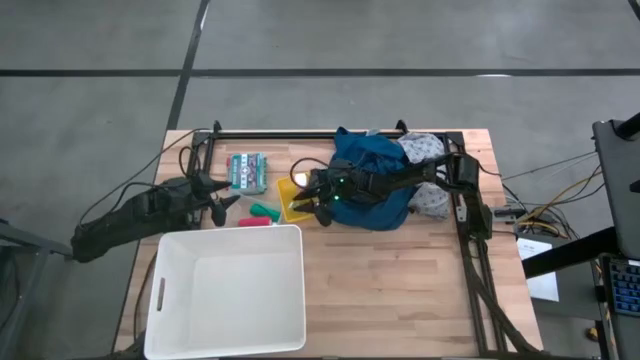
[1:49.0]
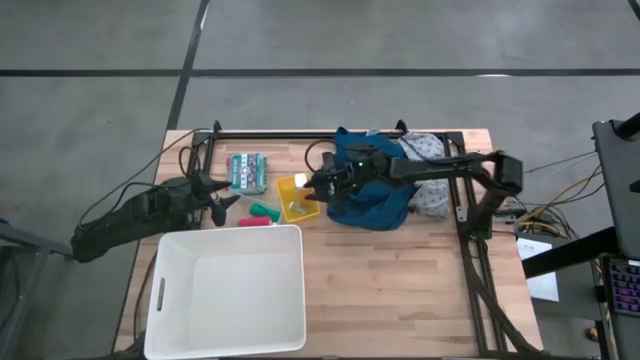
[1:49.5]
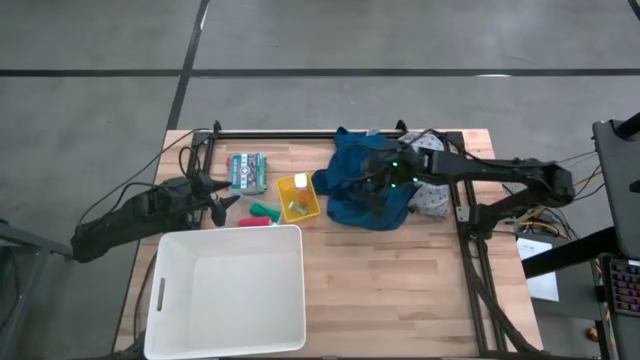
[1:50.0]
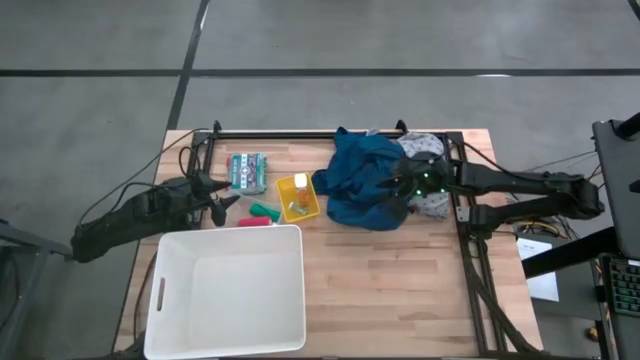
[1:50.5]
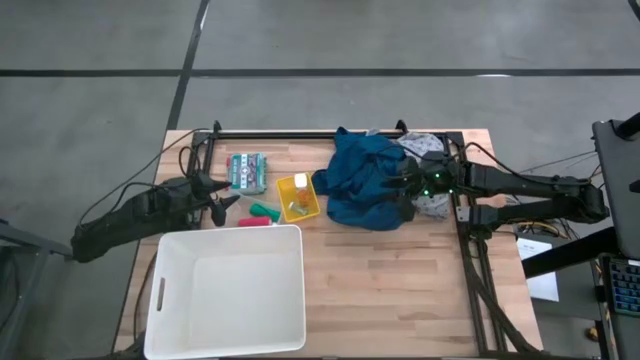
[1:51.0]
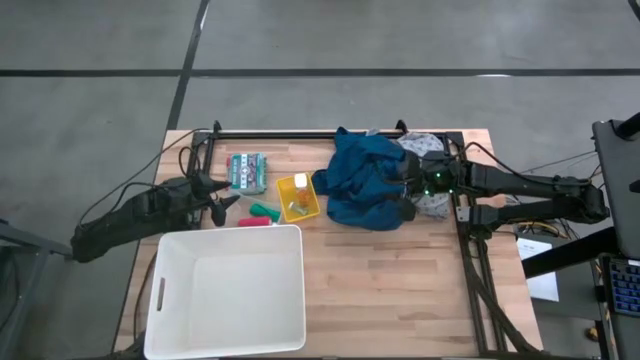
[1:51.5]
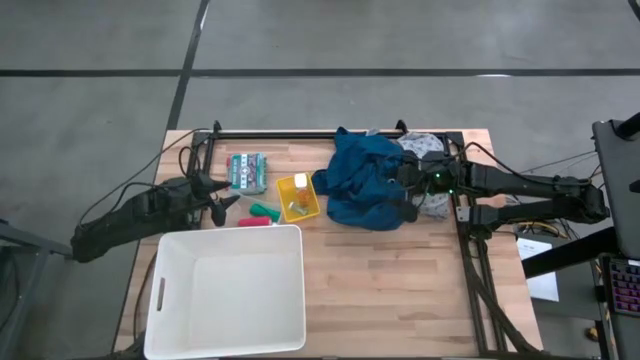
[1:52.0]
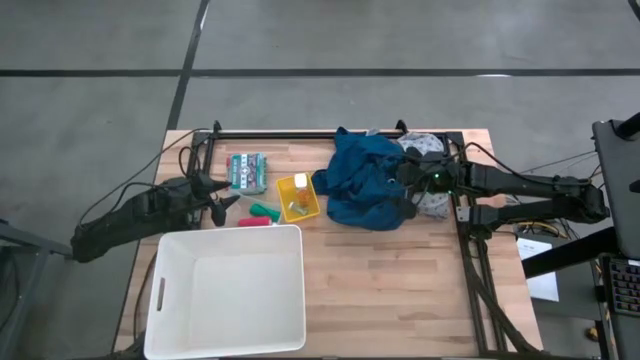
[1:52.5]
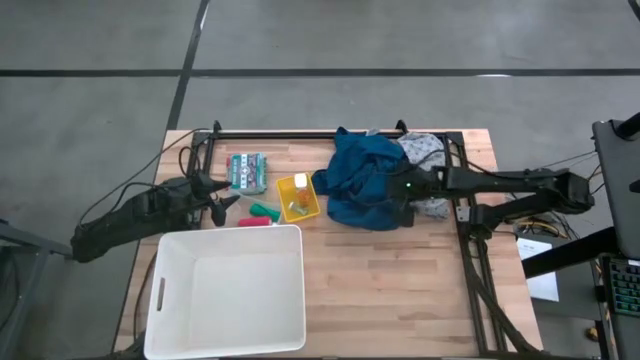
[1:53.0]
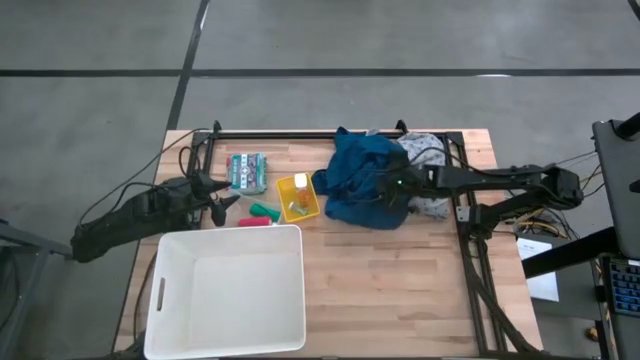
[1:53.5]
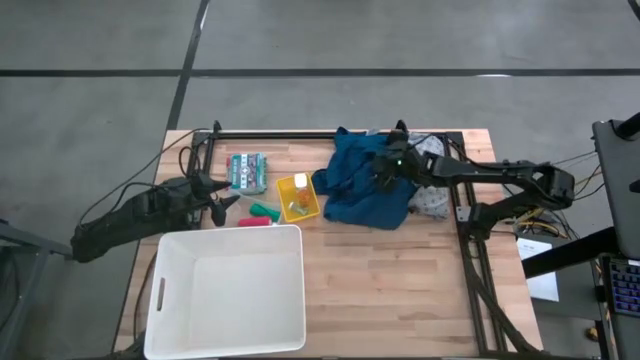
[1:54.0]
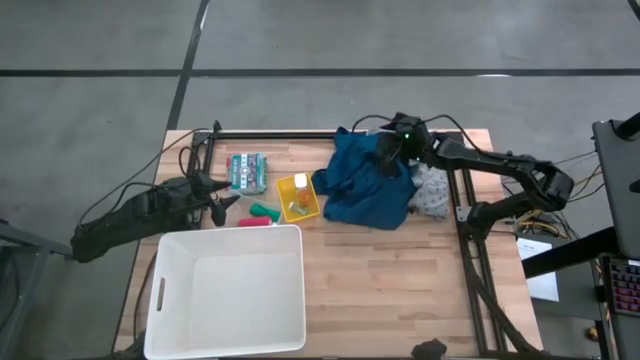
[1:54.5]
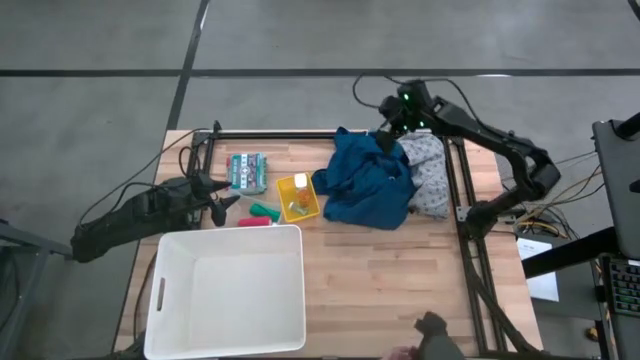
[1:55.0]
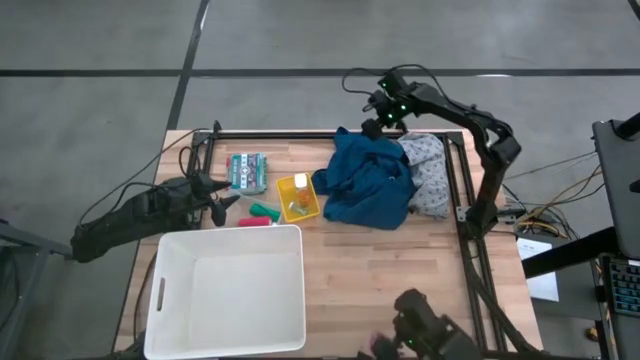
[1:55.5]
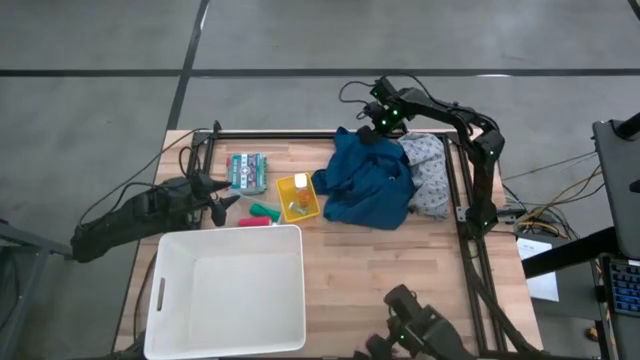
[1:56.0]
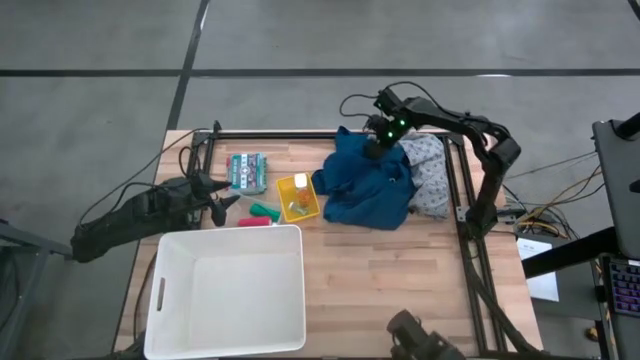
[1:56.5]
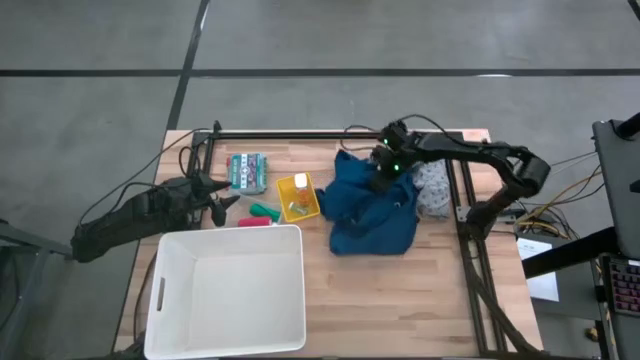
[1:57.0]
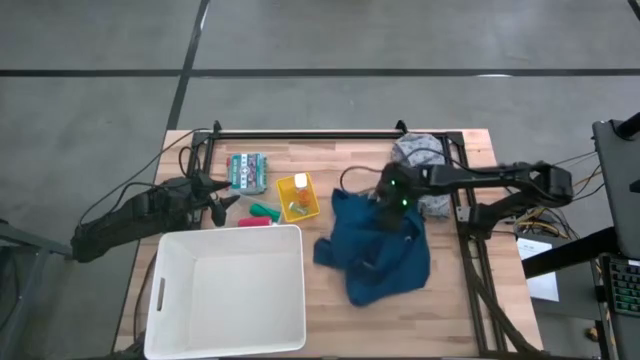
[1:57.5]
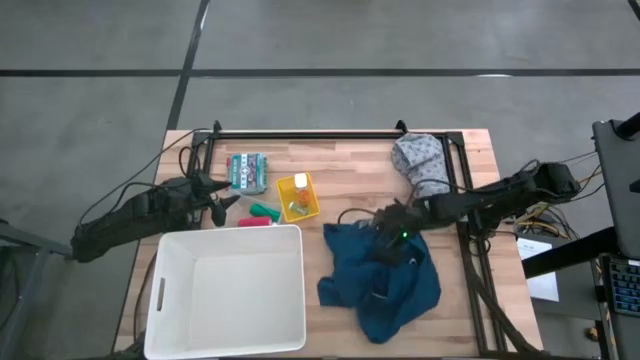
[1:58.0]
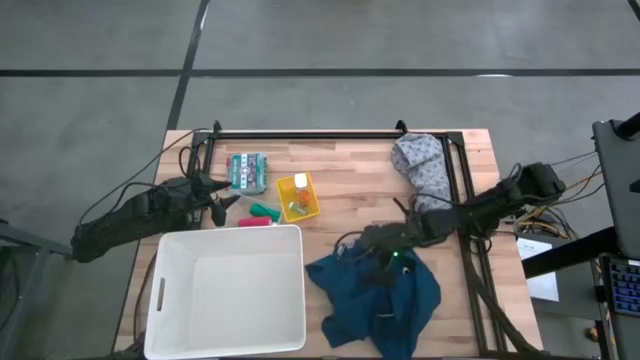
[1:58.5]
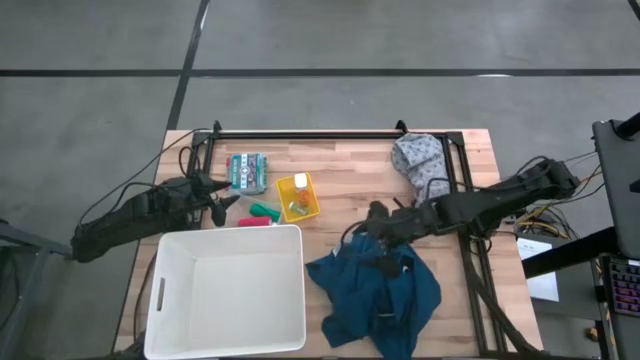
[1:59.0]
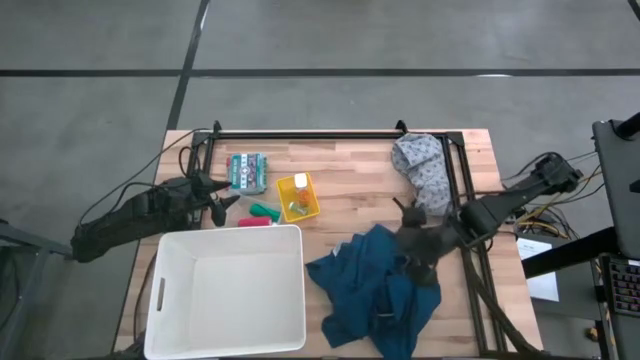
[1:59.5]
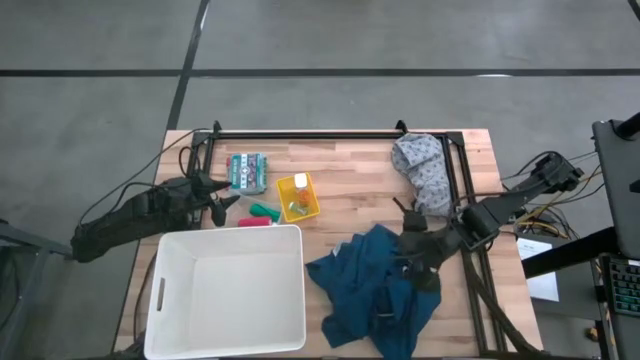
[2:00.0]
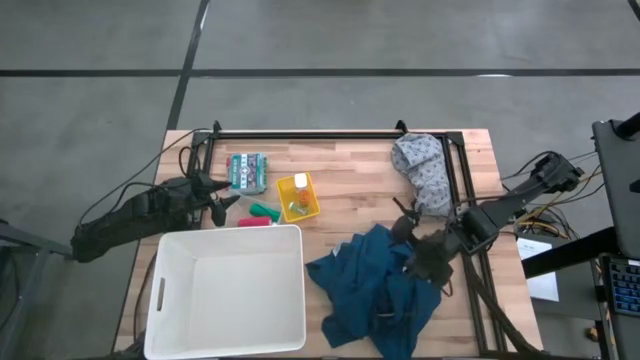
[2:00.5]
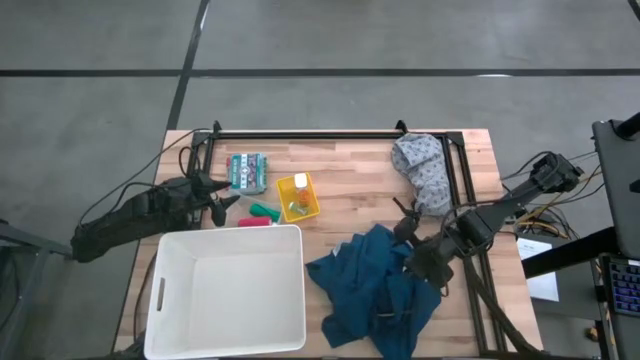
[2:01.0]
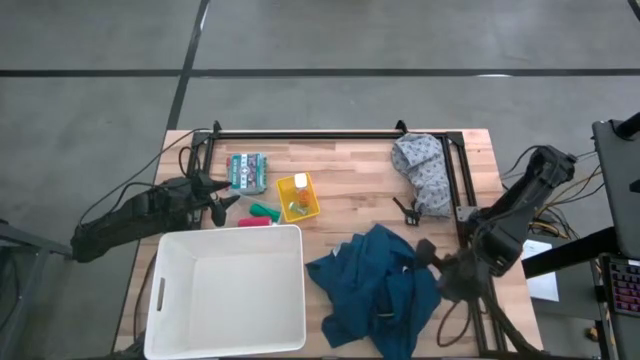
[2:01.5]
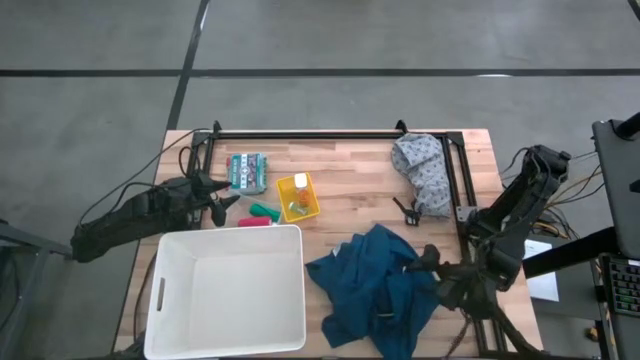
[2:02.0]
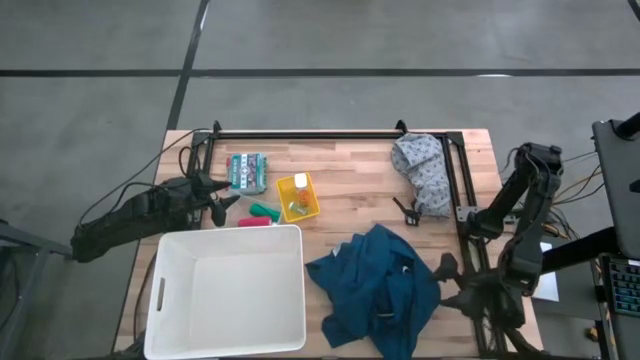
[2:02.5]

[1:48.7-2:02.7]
Task: Pick & place medical supplies in basket/bin
Put the blue patient gown into the white bin

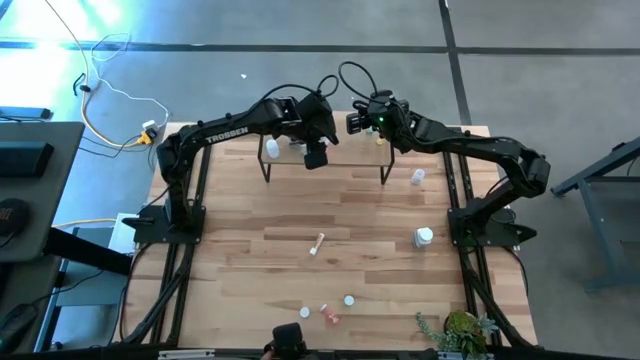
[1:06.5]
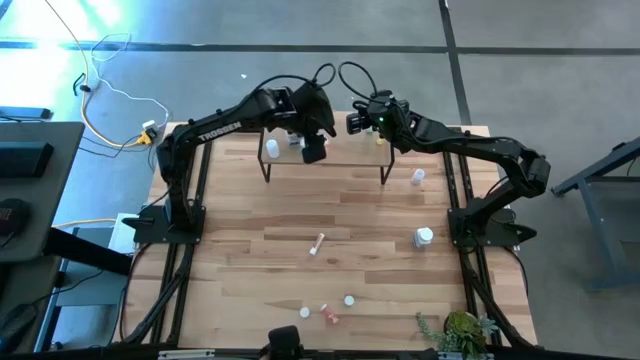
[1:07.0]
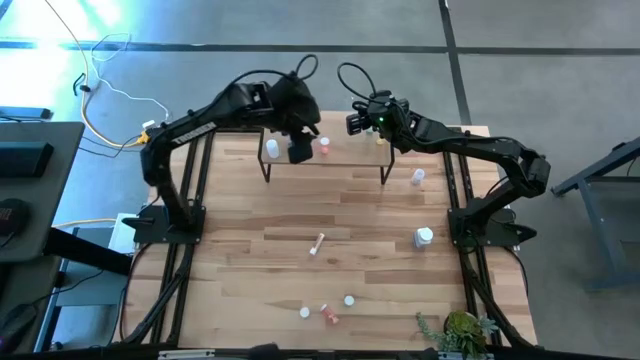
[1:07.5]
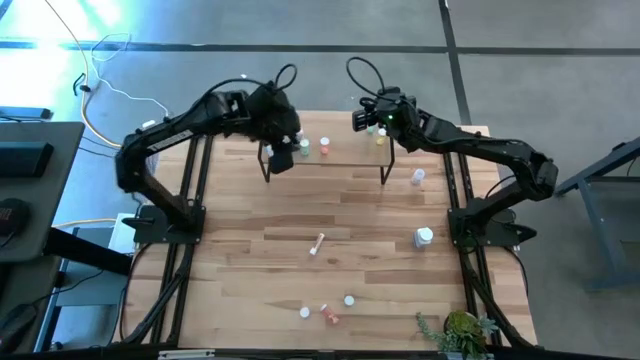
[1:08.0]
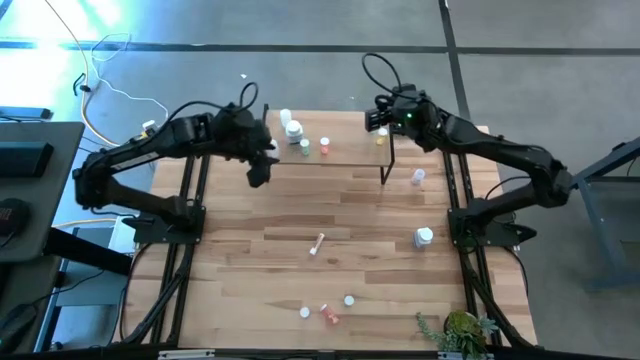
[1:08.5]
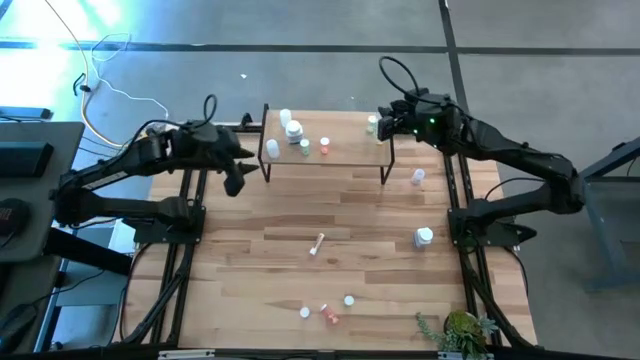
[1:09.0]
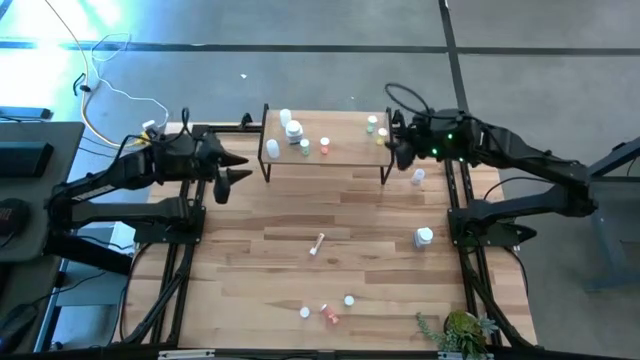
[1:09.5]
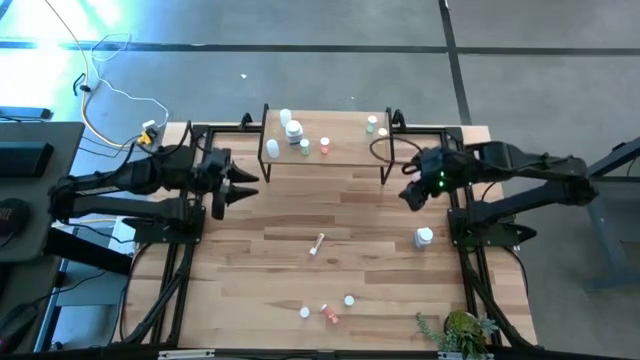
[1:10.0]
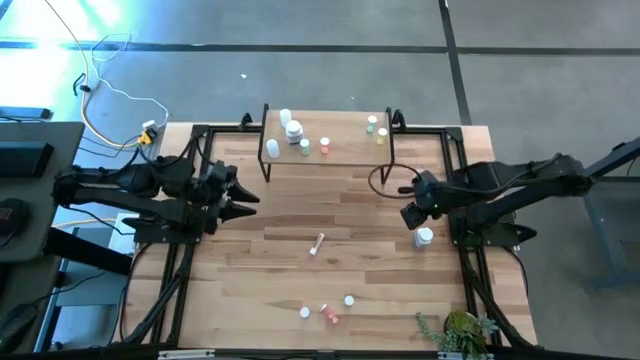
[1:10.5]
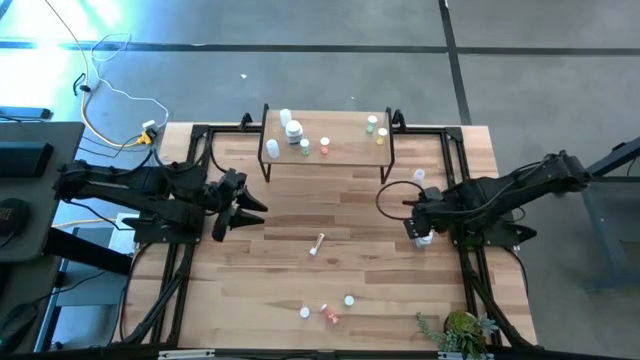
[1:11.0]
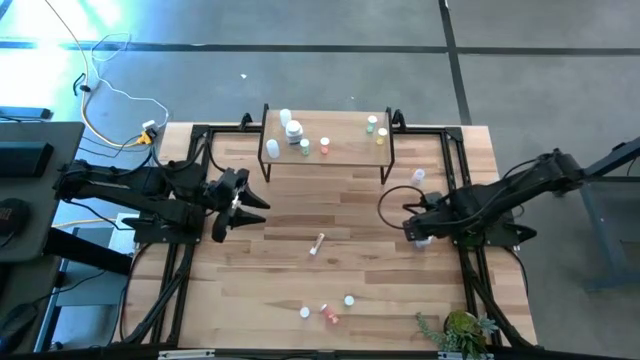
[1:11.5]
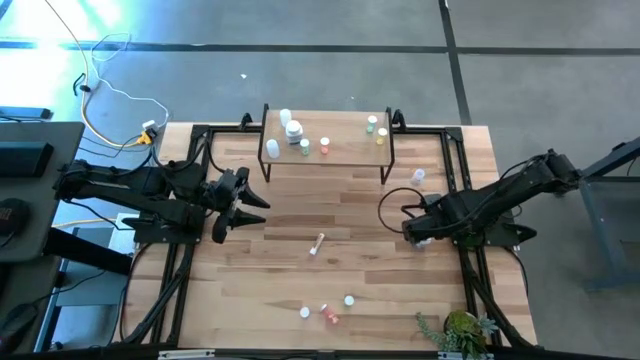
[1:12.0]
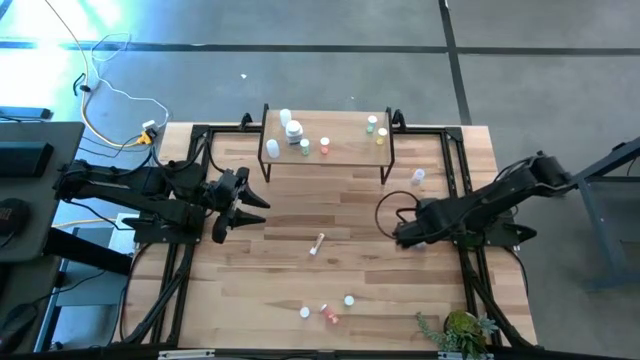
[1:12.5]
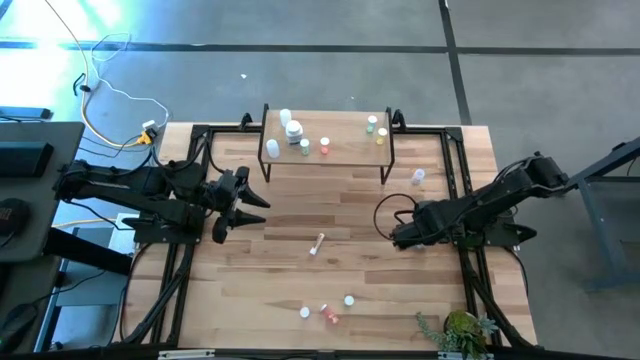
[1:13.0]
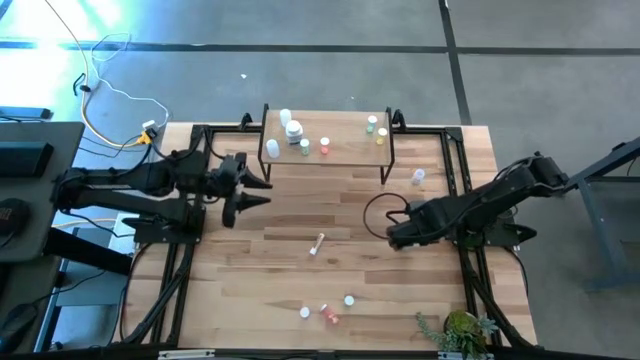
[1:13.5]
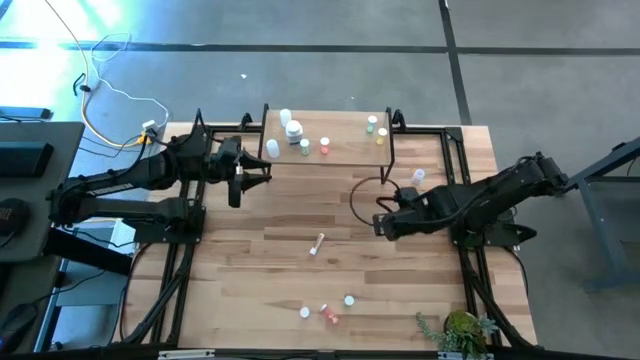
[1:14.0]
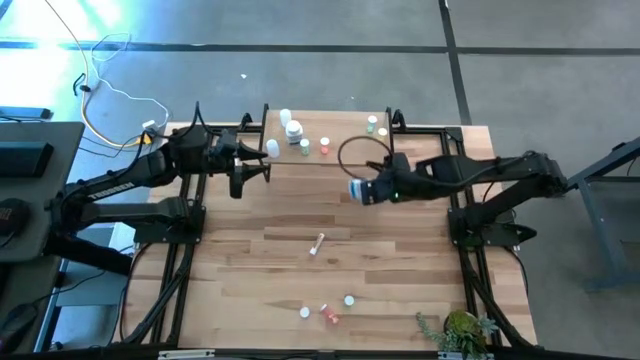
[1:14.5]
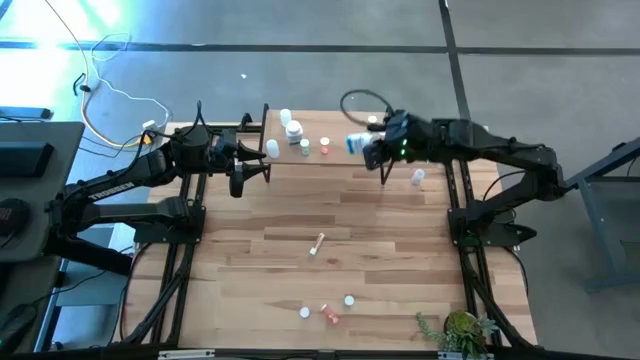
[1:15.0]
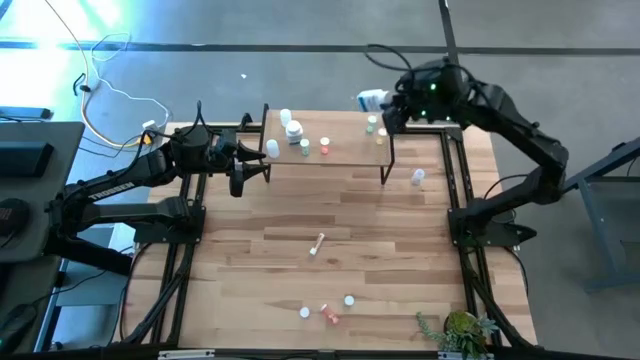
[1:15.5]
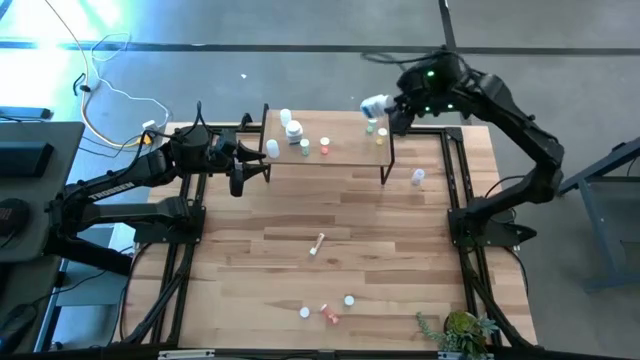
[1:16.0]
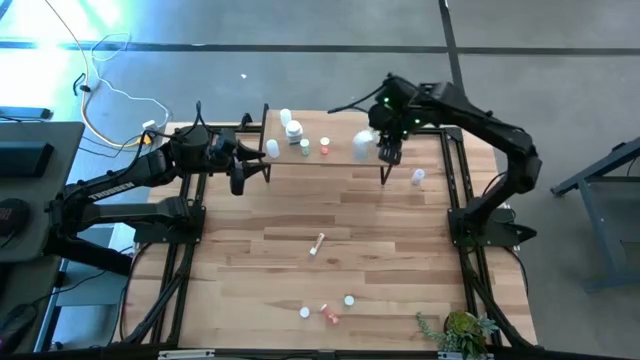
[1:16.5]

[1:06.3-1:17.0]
Task: Pick and place medicine bottles onto shelf by color
Put the large white pill bottle on the shelf
